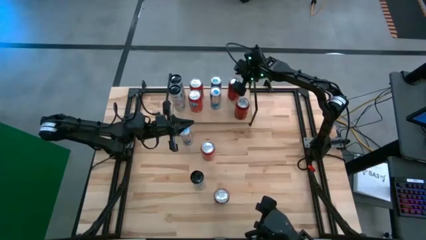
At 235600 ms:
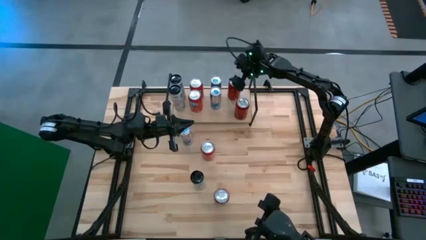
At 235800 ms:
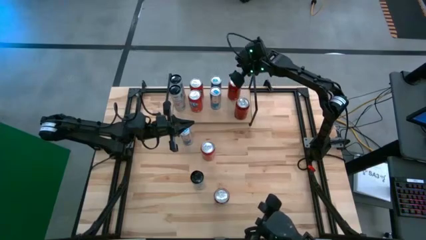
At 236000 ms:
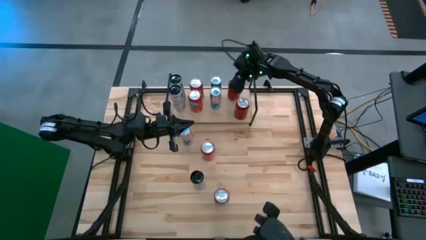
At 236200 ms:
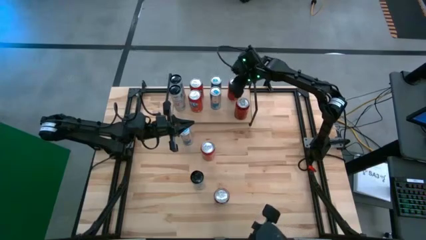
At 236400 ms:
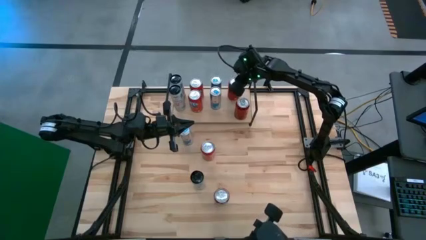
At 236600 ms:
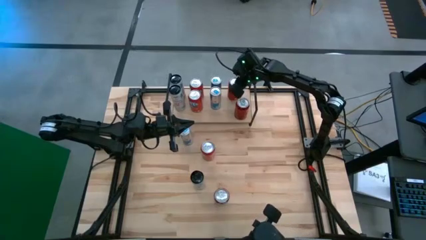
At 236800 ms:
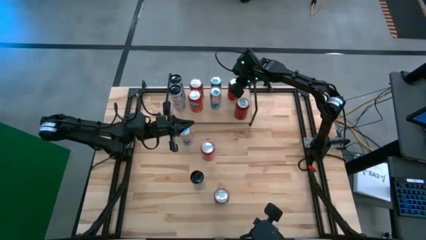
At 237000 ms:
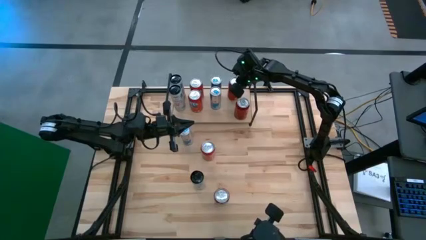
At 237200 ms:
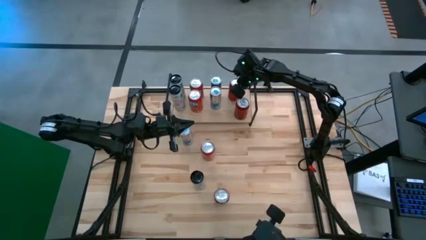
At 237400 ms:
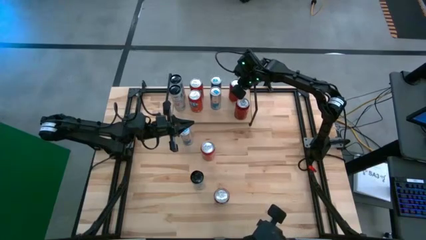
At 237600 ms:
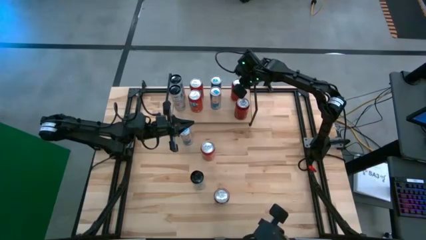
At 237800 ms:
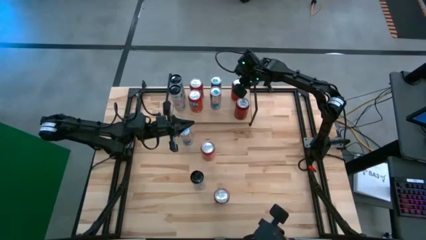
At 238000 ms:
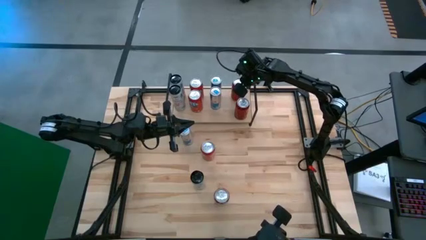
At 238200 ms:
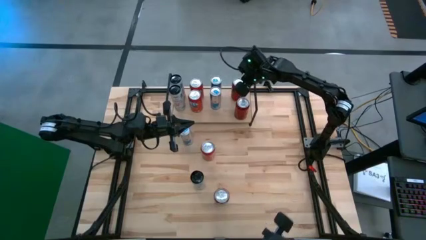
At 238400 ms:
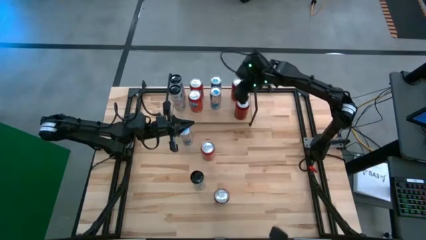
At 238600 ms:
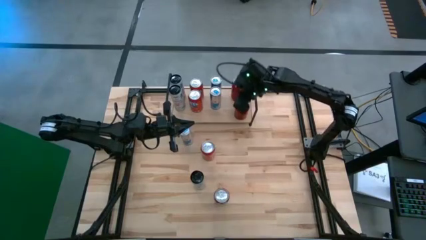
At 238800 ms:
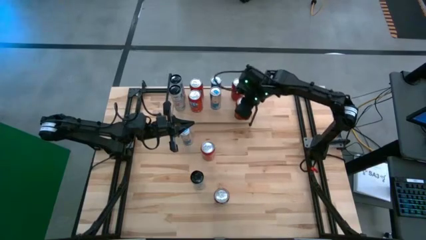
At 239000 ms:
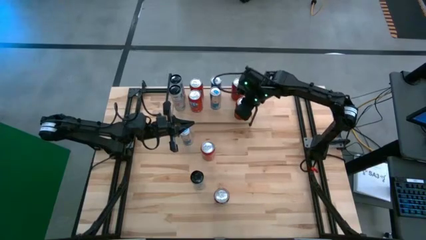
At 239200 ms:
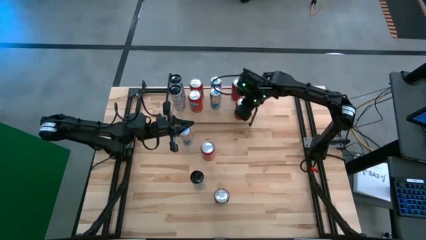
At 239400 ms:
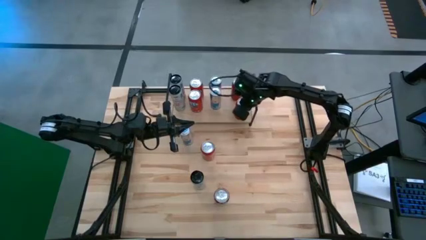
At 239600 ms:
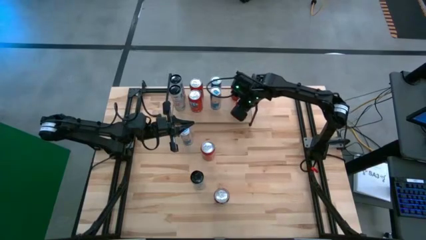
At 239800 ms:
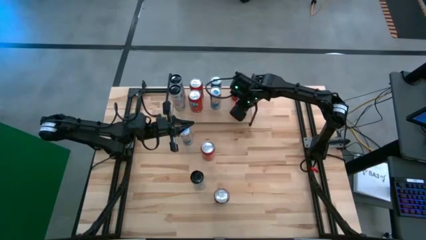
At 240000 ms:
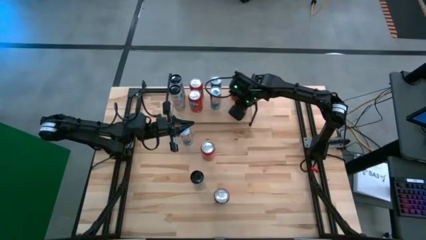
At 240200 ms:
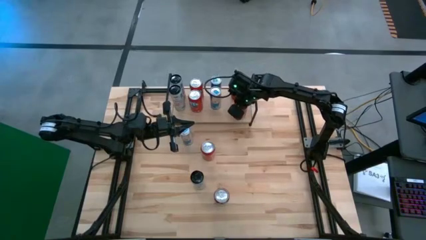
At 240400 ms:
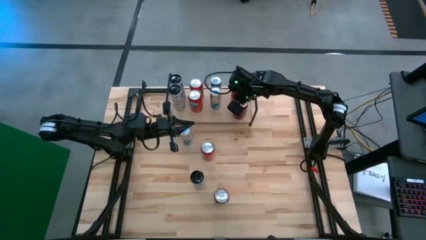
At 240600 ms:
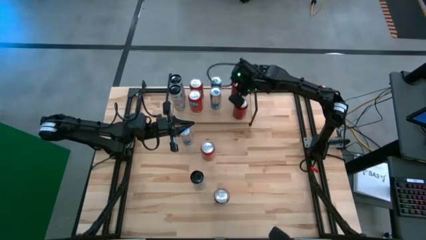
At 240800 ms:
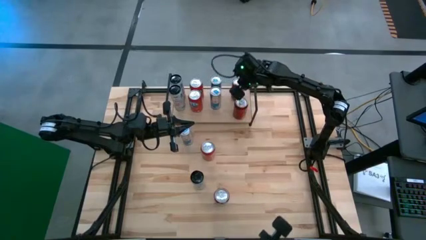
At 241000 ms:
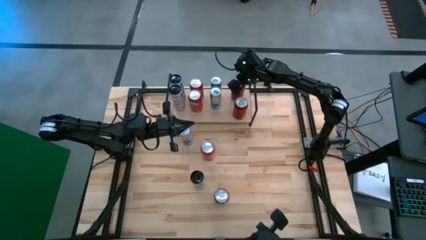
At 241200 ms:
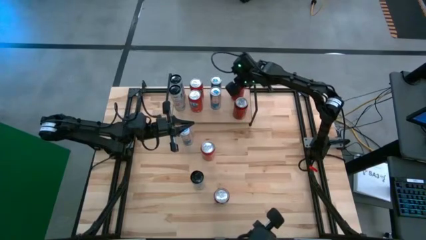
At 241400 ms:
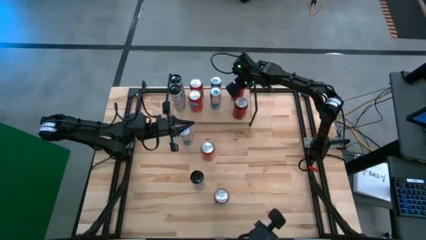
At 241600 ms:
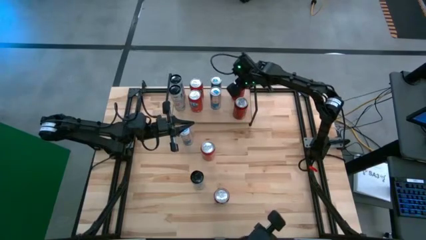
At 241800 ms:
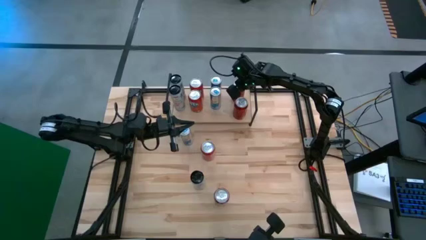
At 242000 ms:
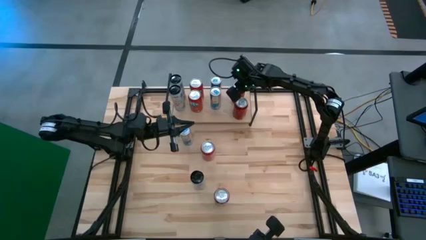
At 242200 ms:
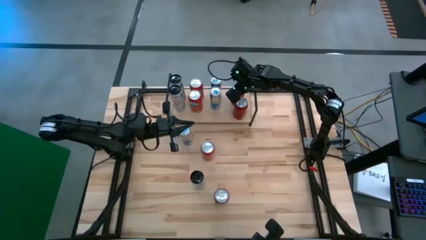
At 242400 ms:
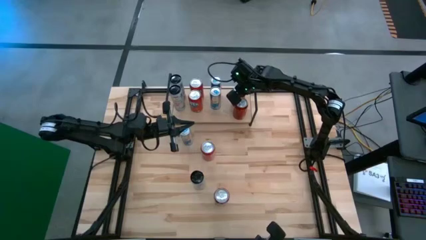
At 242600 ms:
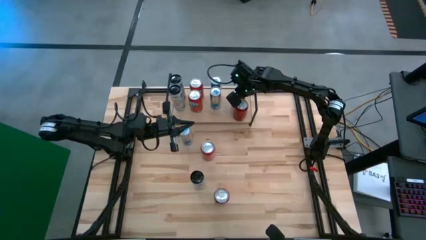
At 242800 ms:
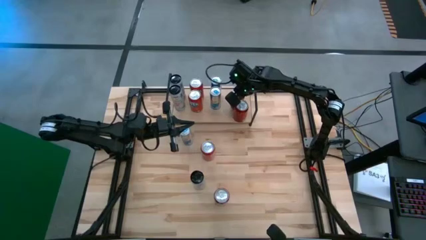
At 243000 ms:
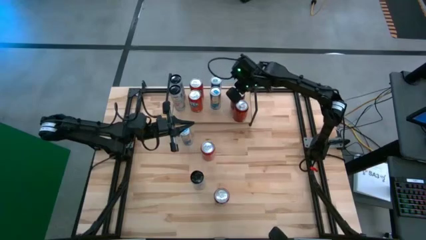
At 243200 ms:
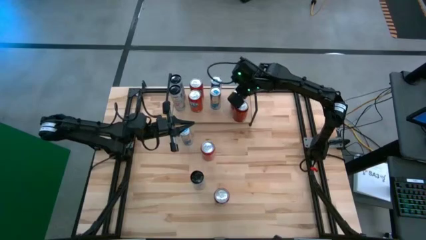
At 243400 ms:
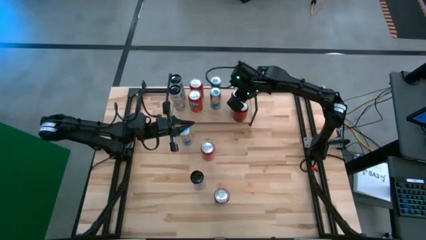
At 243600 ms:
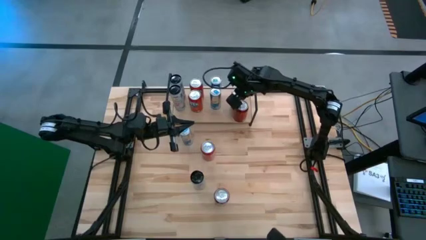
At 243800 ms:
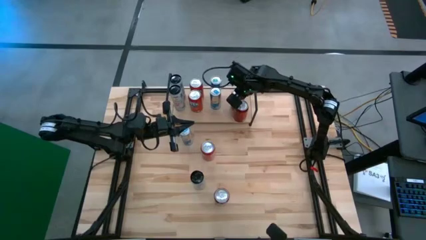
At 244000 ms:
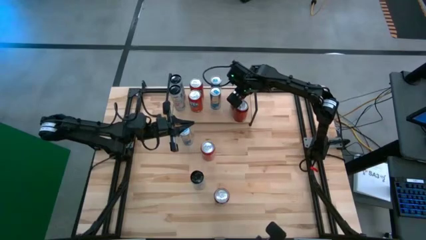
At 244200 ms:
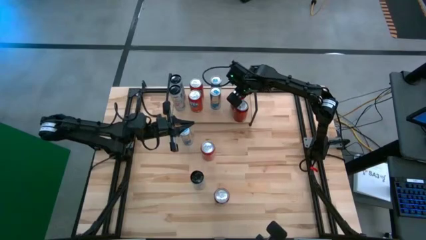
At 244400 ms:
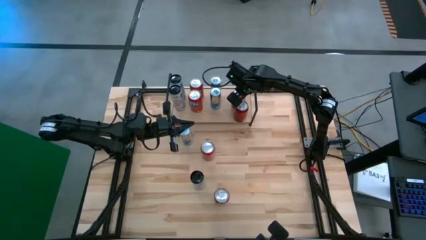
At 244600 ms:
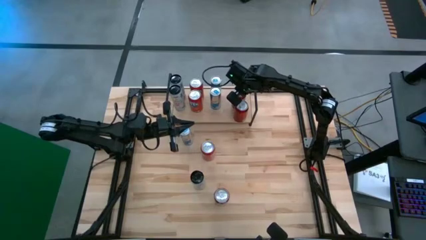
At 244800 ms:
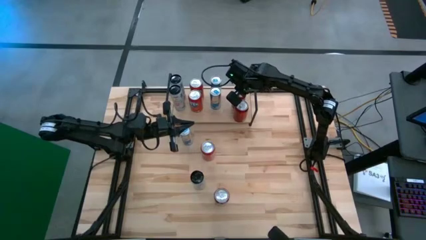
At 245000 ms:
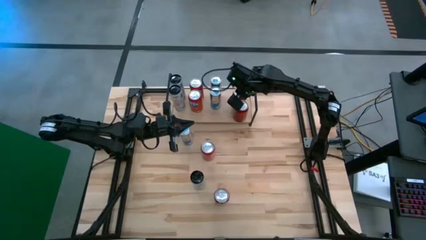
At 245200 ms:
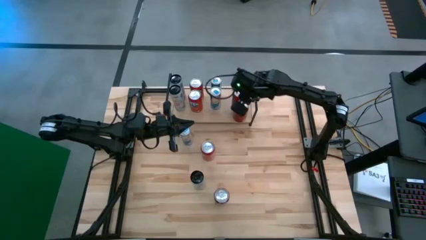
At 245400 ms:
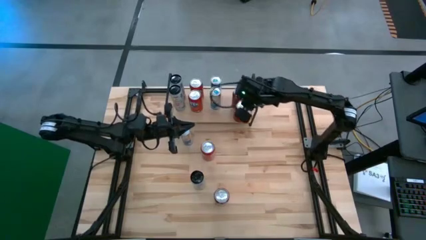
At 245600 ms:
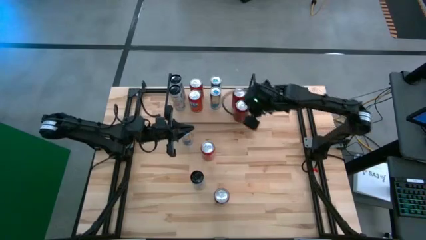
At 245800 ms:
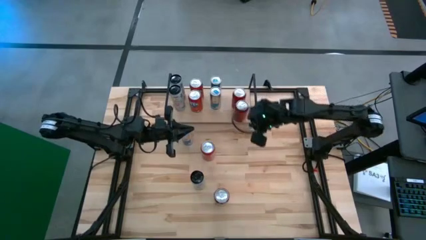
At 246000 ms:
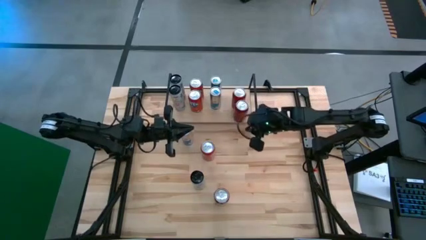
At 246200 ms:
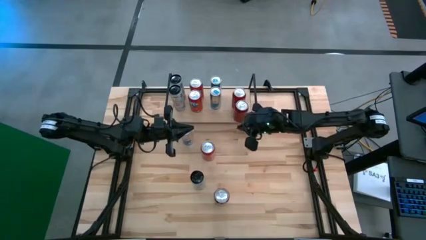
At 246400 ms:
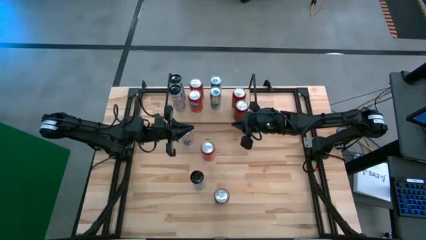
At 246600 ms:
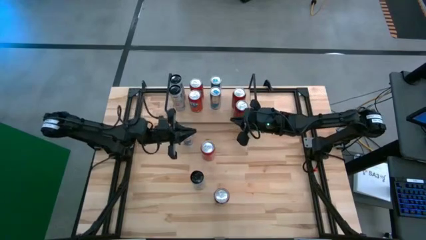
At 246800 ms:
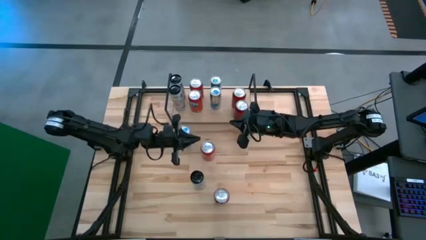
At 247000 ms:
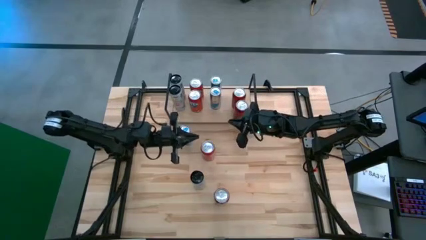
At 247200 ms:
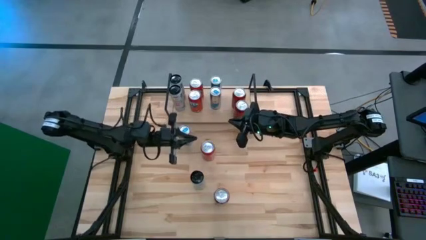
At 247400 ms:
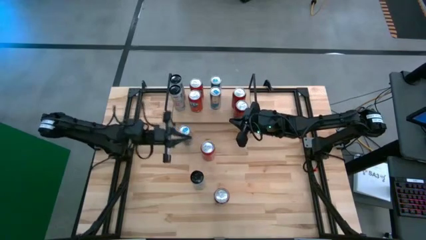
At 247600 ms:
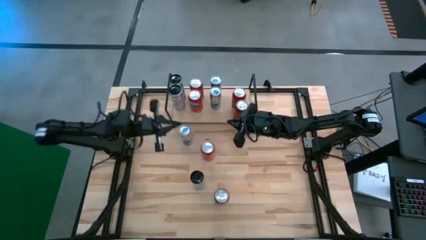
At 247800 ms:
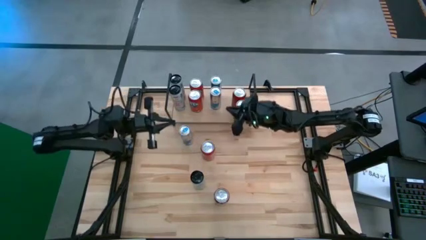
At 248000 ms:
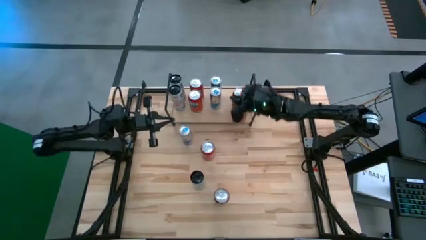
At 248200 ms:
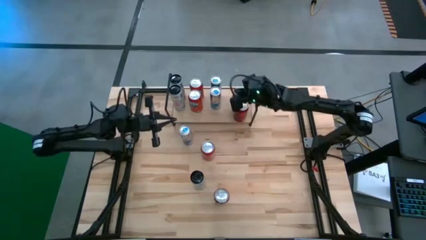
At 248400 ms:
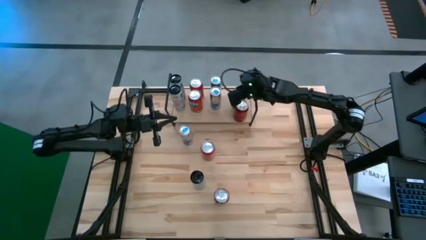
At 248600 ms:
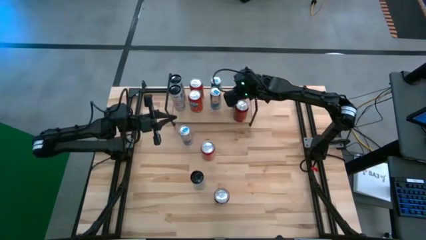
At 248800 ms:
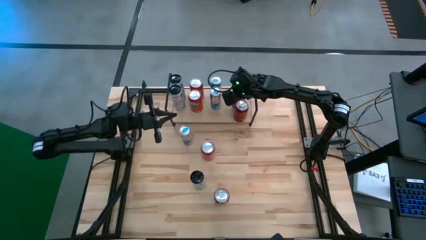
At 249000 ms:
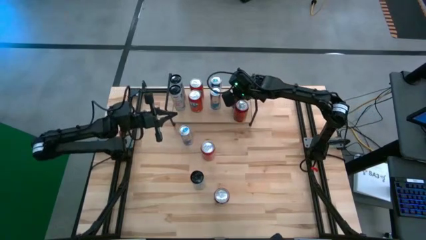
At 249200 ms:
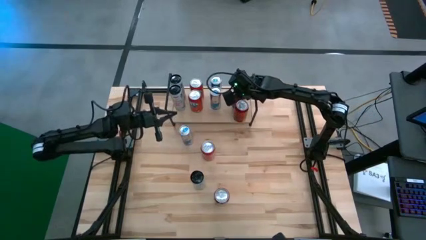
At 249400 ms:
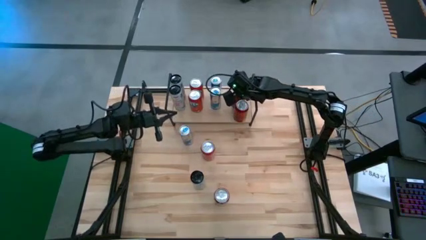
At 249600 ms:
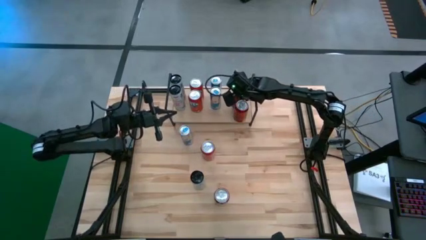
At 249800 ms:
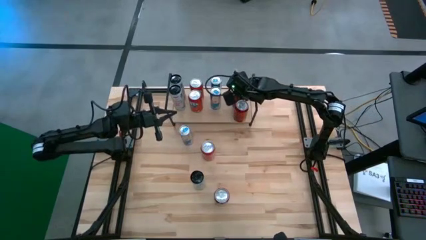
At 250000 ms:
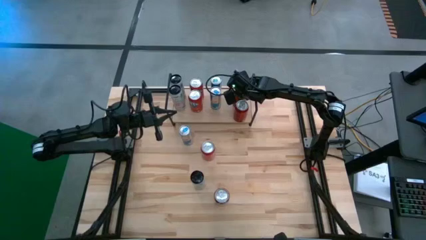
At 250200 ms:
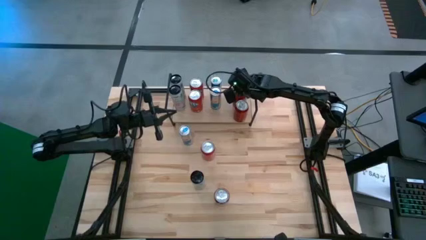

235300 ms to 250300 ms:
Task: Place canned beverage on shelf
Put the top red soda can on the shelf aligned with the other red soda can
